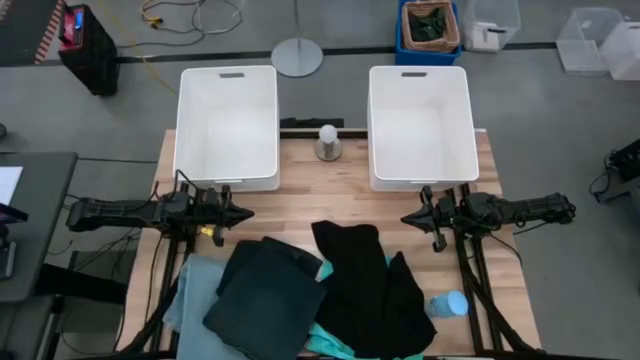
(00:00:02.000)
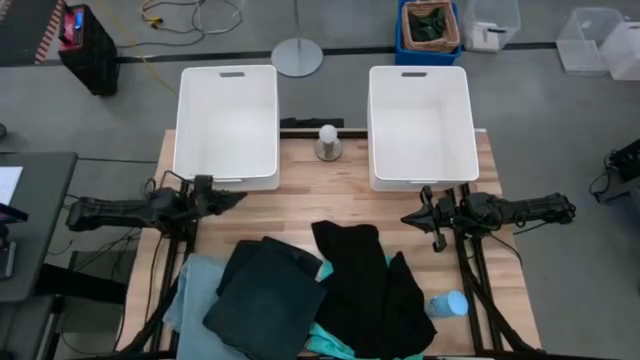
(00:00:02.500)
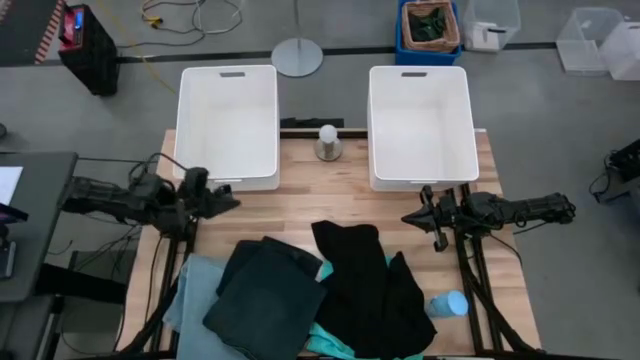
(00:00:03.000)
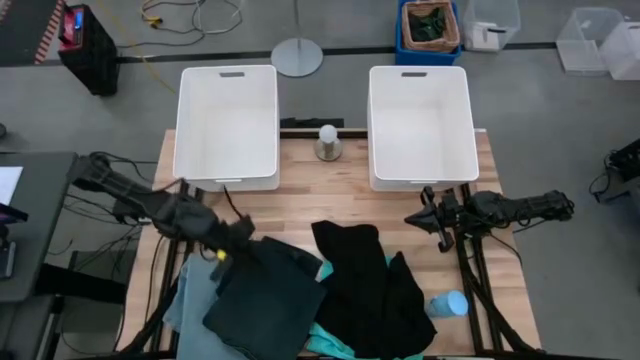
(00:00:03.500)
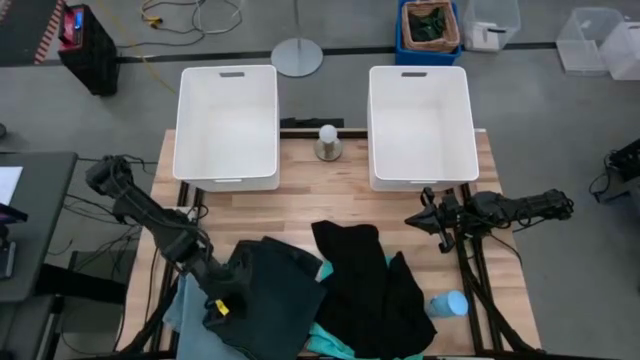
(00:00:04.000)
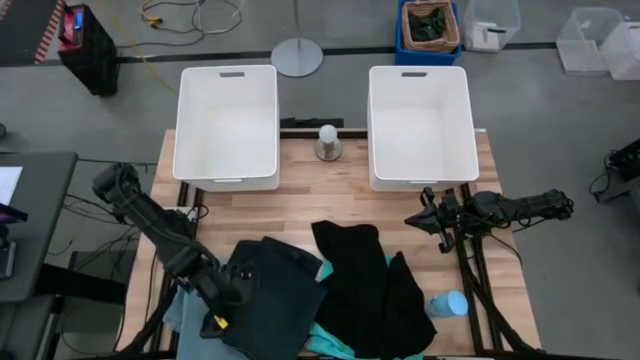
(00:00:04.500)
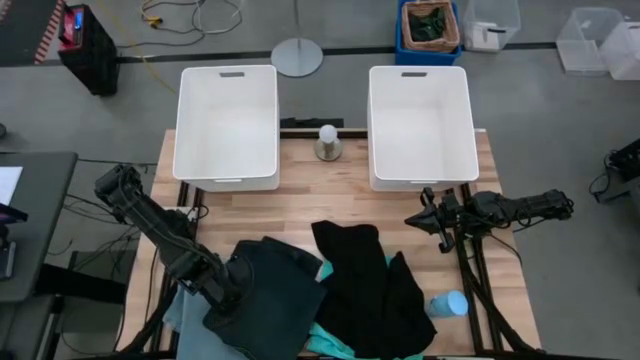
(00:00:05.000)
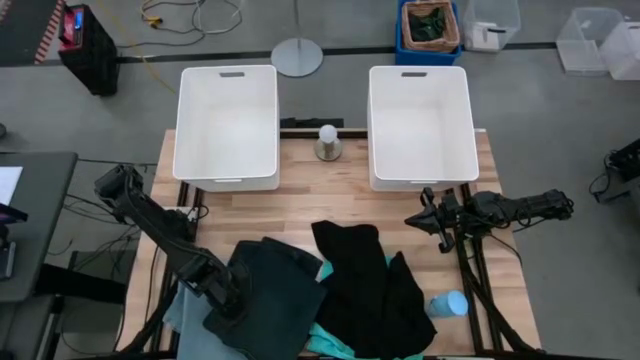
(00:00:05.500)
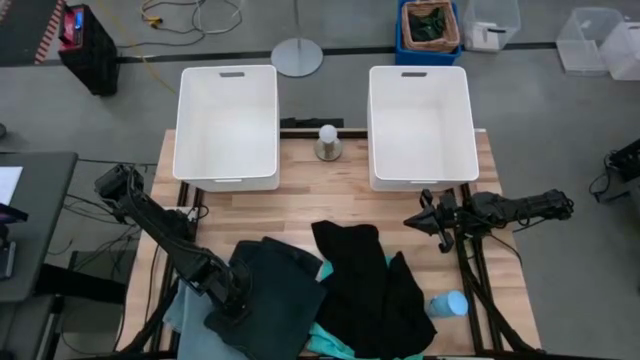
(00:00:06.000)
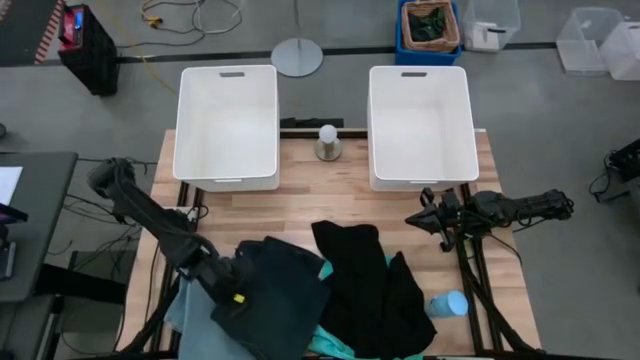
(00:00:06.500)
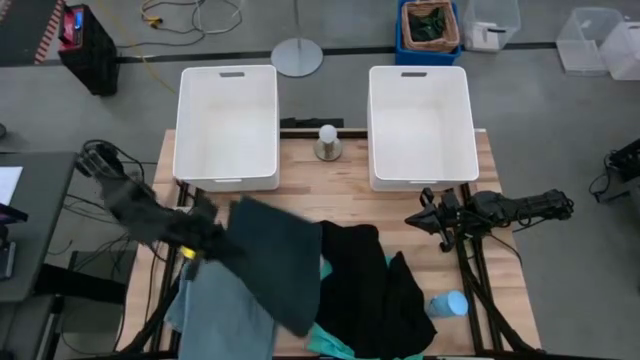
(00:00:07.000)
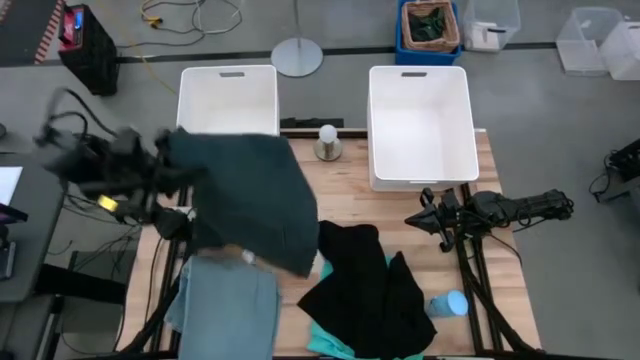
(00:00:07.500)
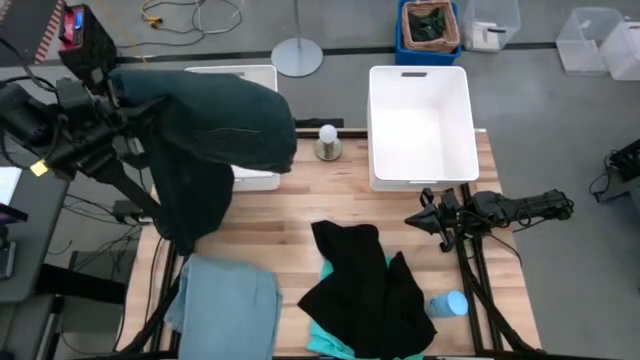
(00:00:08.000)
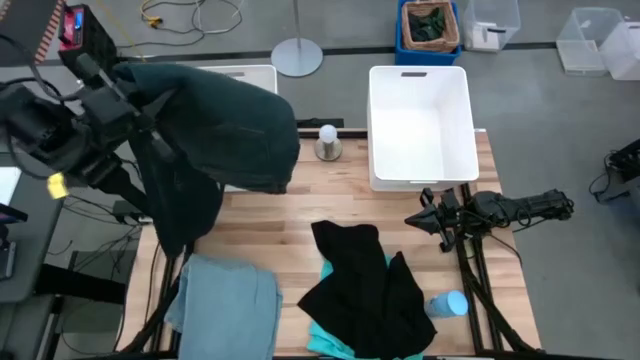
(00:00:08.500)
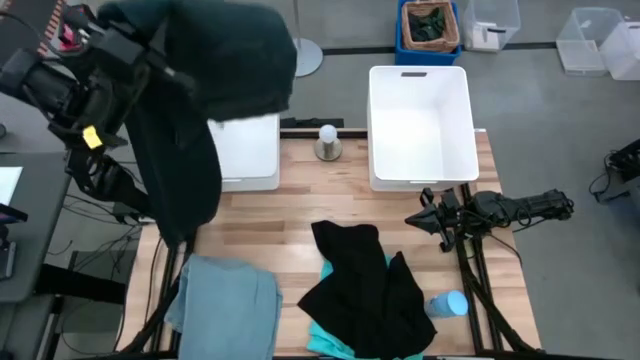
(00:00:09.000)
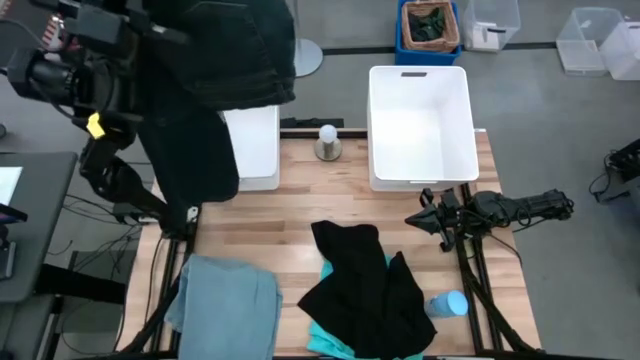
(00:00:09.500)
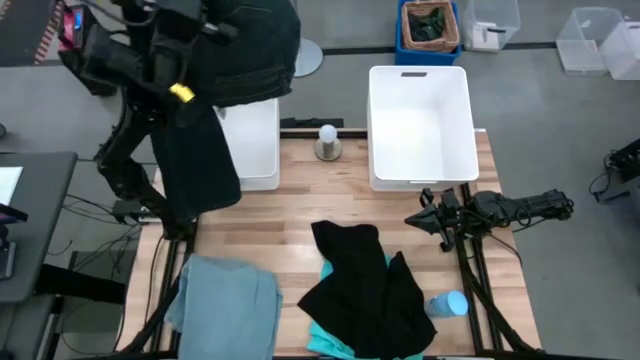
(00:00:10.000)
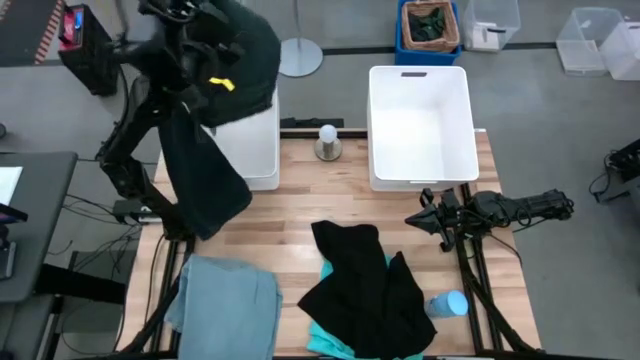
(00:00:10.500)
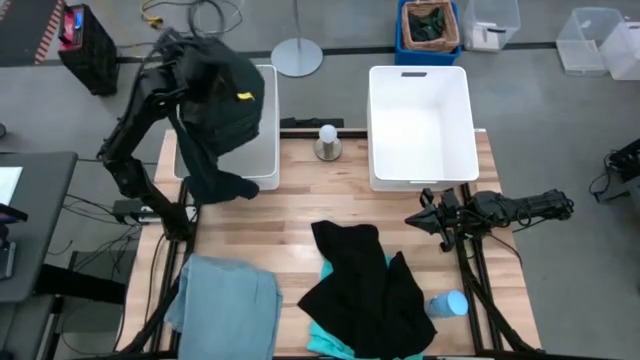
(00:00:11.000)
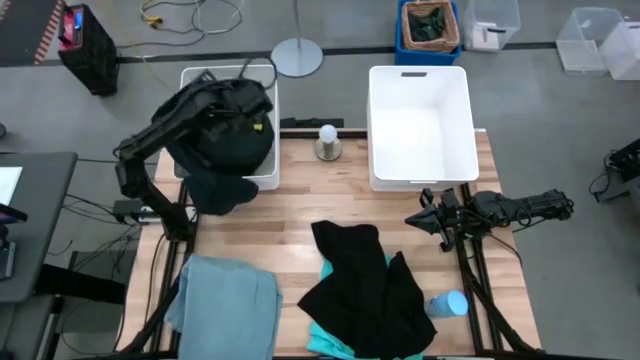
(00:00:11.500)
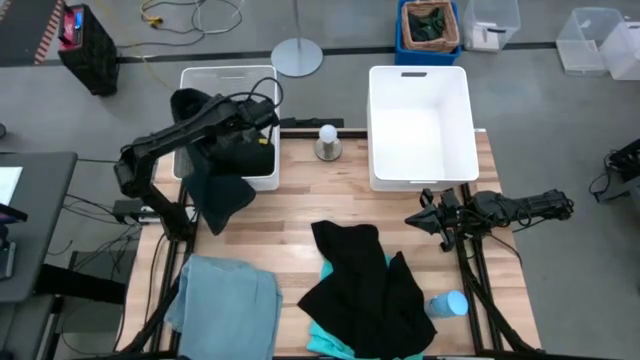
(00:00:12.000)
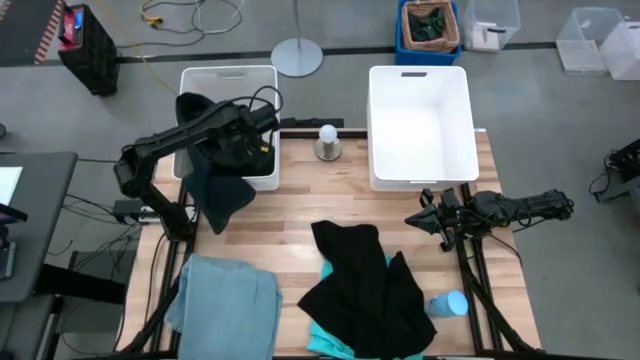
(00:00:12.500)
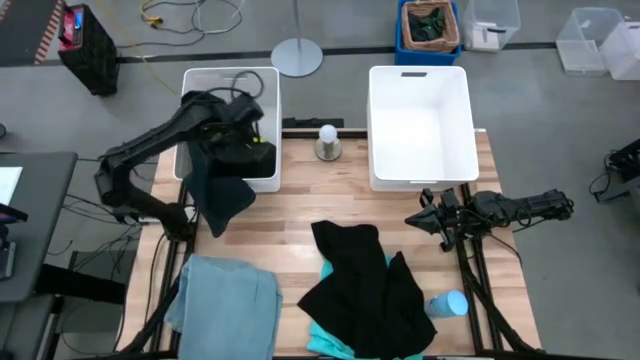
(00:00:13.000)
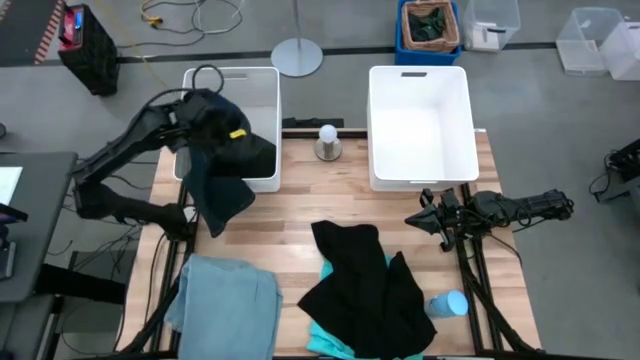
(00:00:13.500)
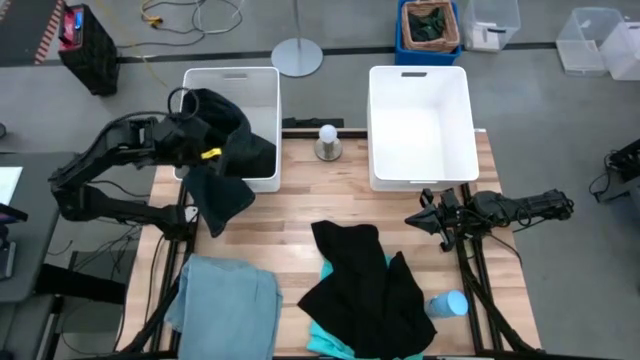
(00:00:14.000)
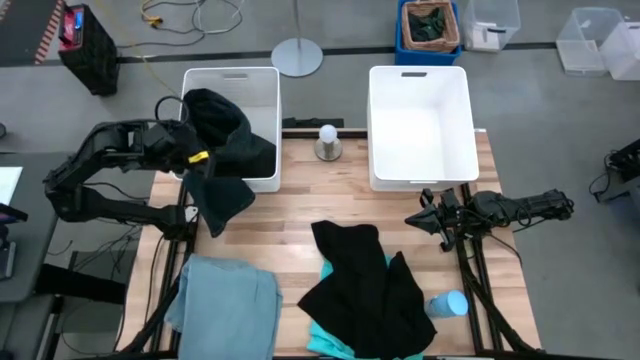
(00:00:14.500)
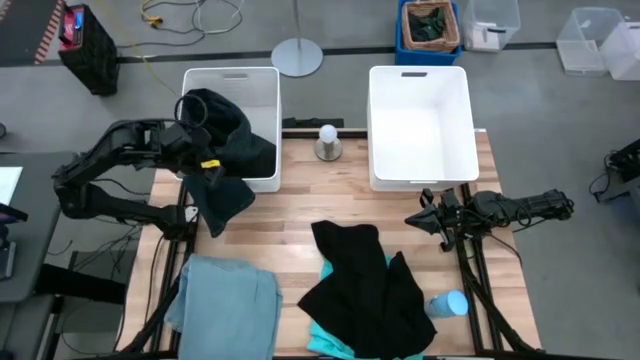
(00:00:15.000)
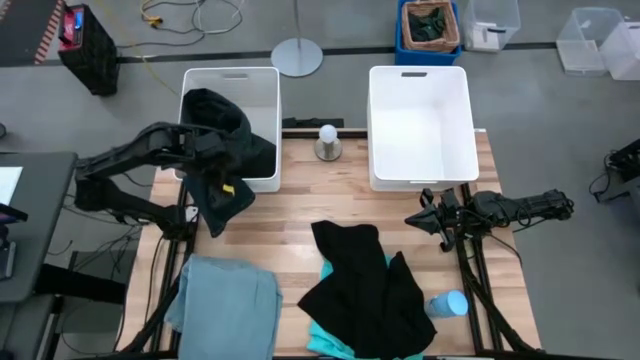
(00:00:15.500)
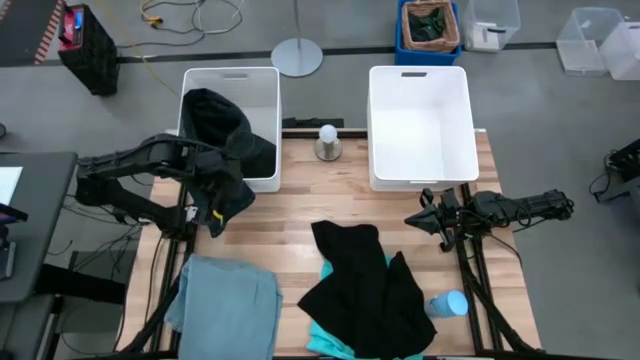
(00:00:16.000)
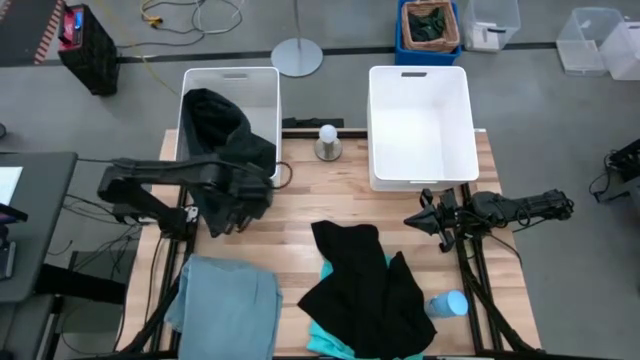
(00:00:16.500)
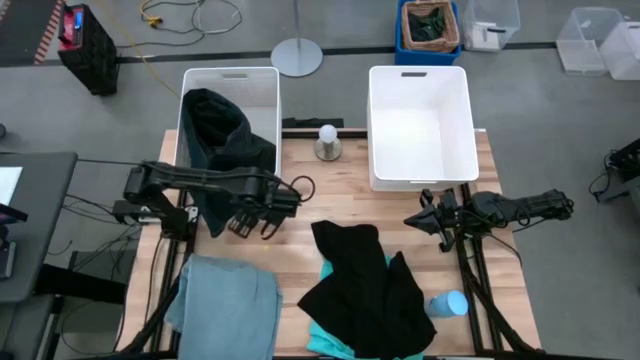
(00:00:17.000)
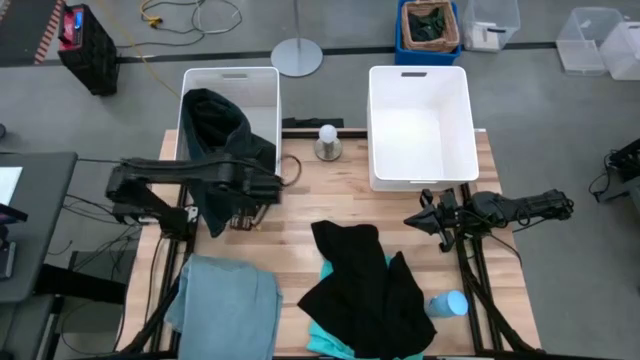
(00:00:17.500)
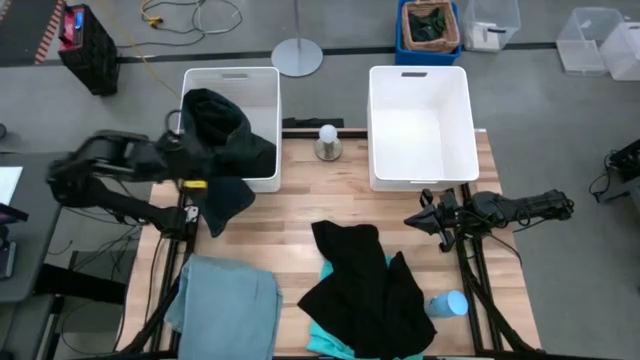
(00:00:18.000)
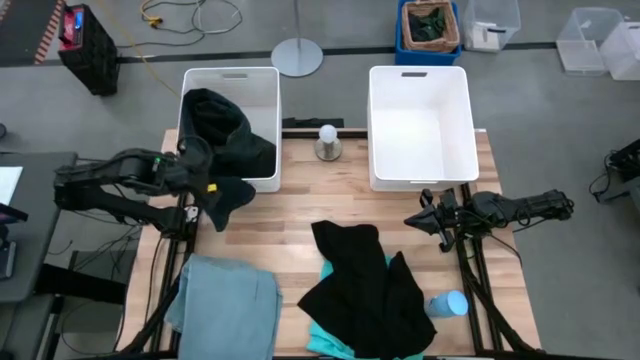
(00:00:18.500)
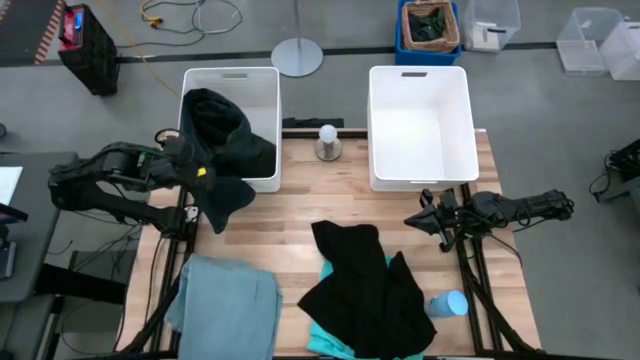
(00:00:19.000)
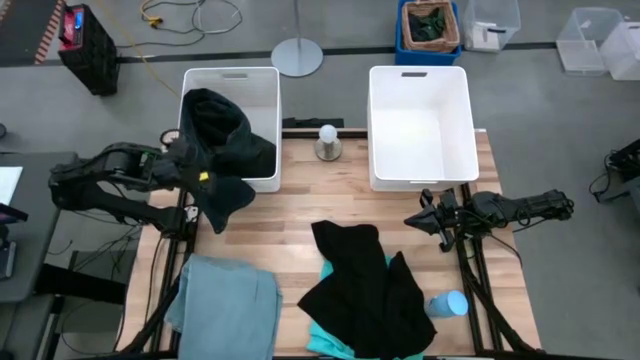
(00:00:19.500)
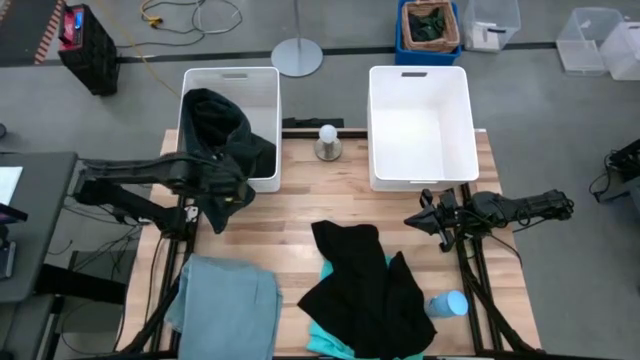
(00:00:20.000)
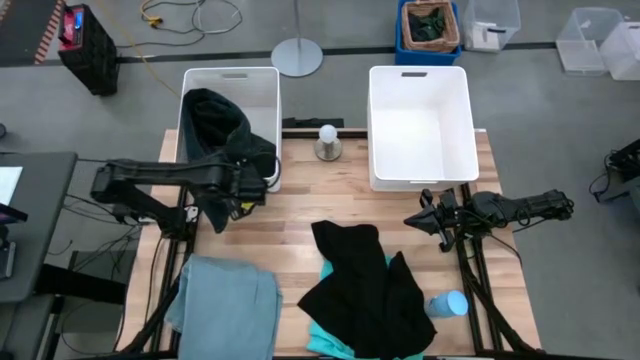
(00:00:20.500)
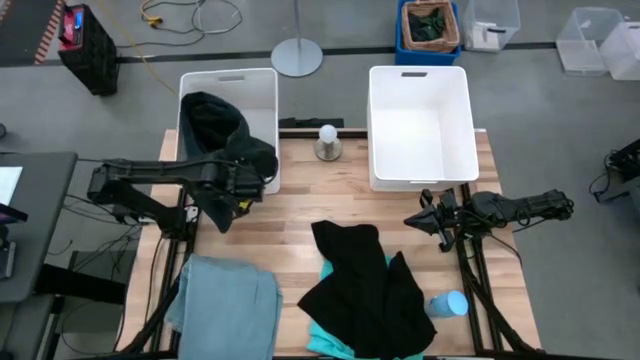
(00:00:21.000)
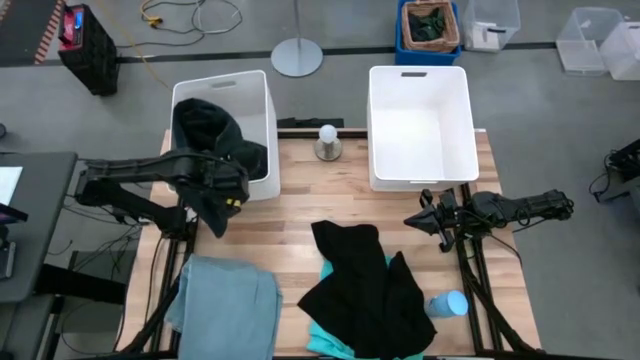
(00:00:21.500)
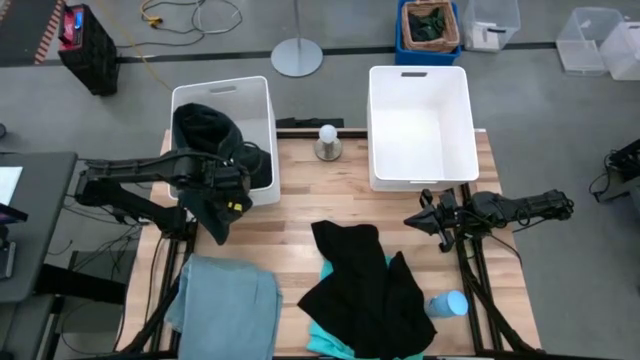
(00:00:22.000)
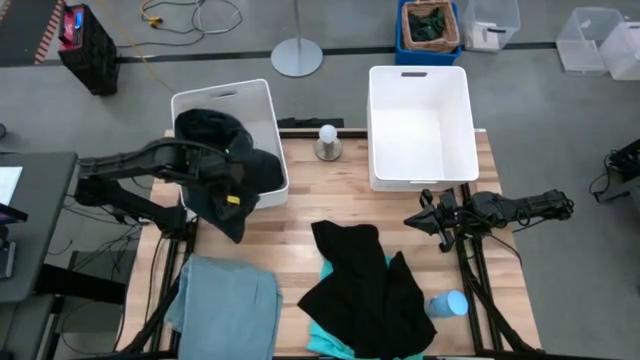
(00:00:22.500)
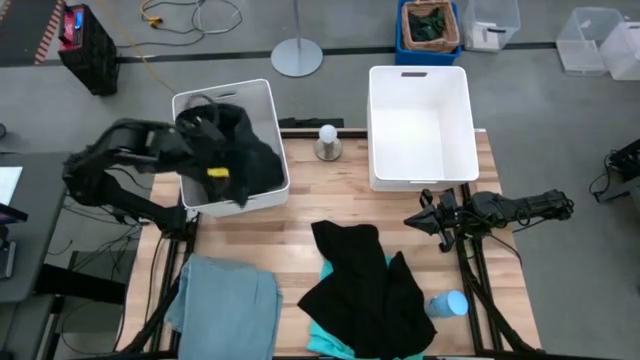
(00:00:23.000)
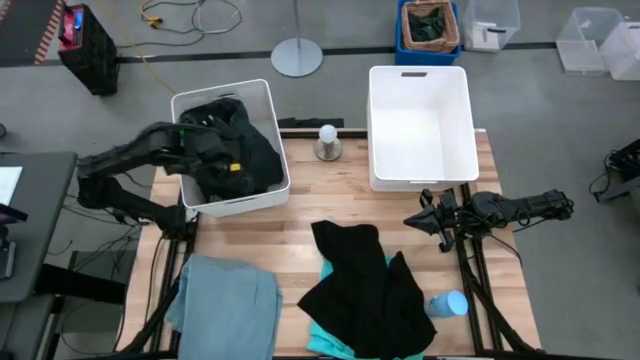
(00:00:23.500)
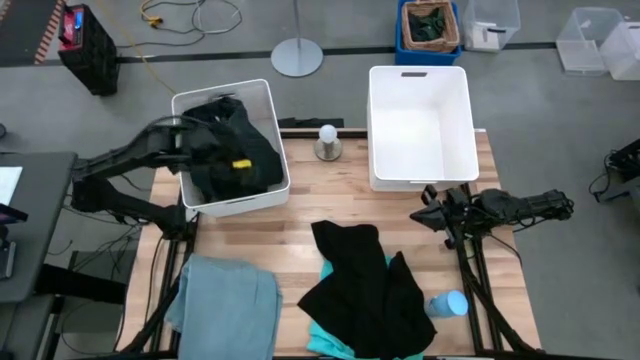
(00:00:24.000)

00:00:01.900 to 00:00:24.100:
Task: Sort clothes
Put the dark blue pants into the left white laundry bin
